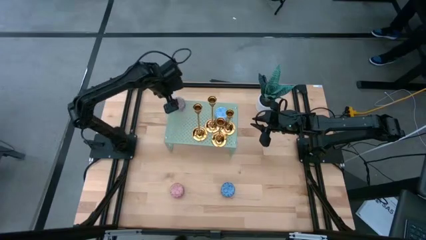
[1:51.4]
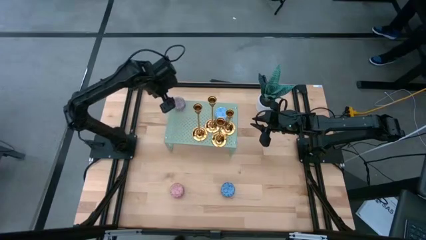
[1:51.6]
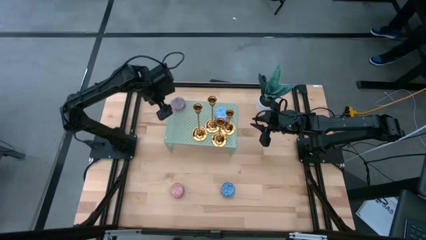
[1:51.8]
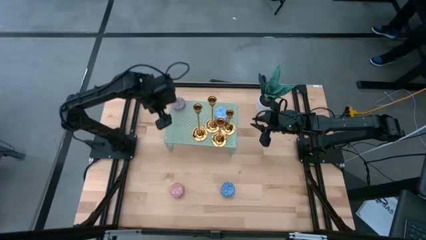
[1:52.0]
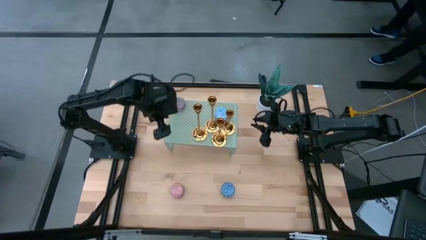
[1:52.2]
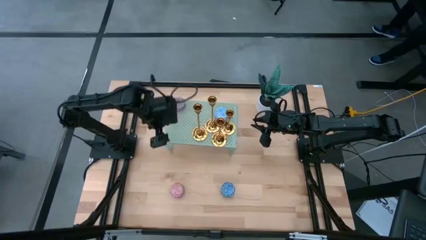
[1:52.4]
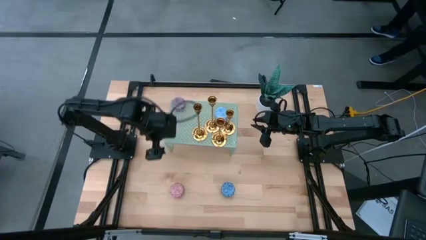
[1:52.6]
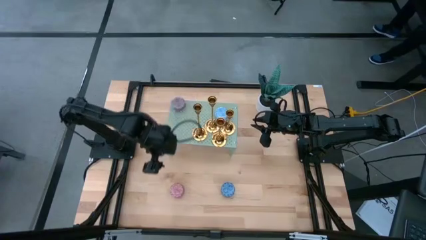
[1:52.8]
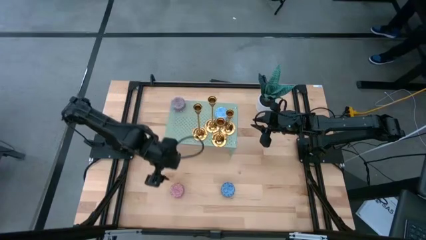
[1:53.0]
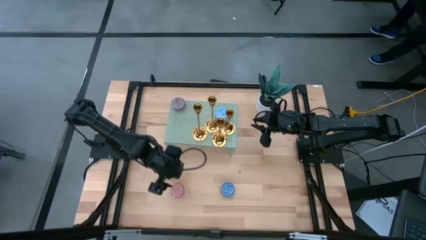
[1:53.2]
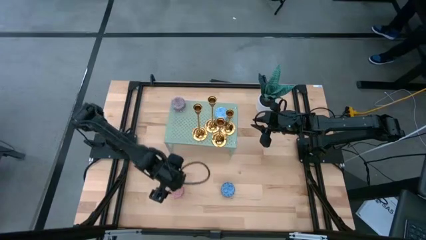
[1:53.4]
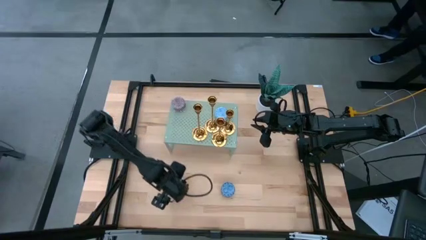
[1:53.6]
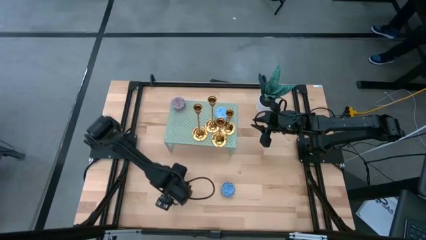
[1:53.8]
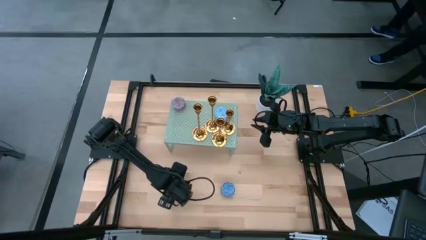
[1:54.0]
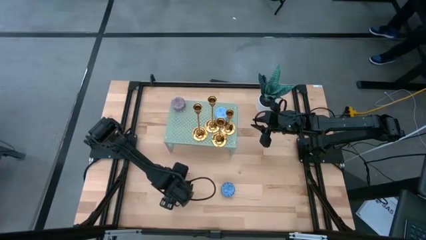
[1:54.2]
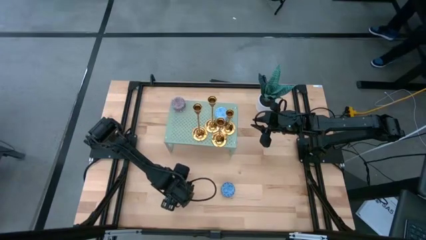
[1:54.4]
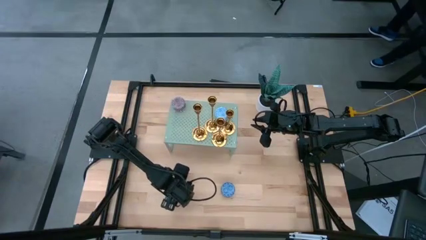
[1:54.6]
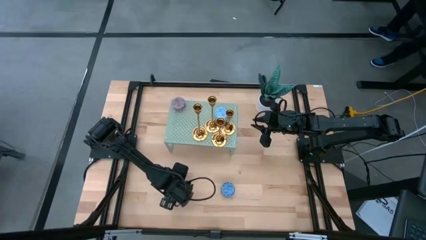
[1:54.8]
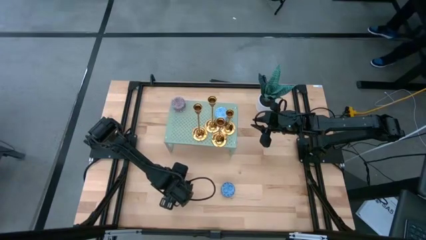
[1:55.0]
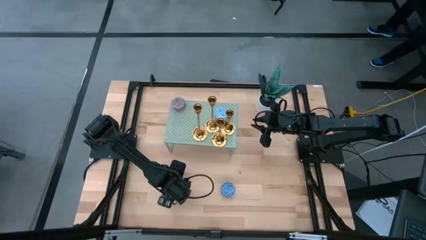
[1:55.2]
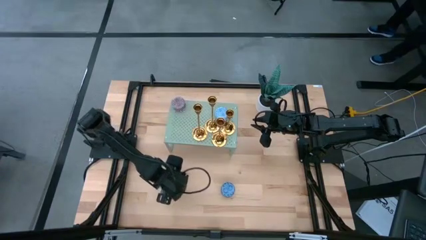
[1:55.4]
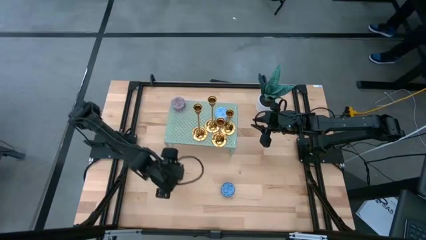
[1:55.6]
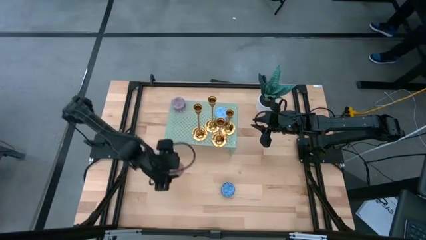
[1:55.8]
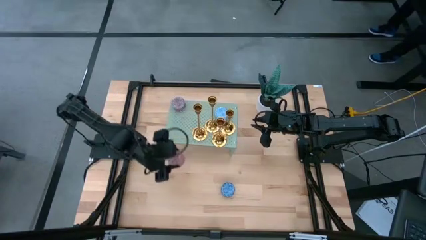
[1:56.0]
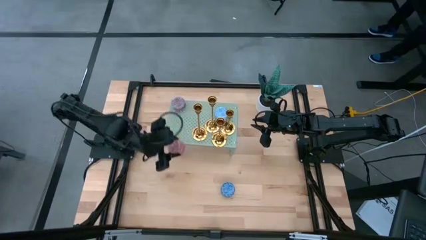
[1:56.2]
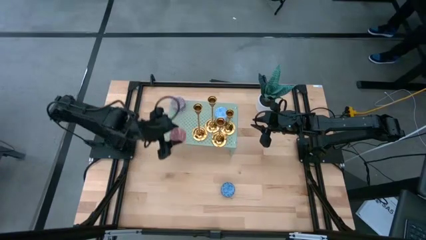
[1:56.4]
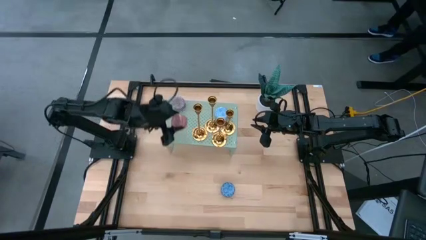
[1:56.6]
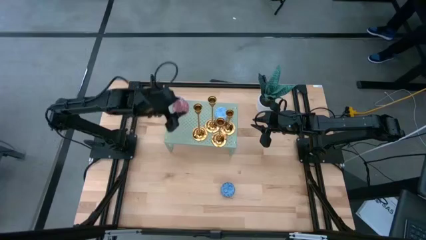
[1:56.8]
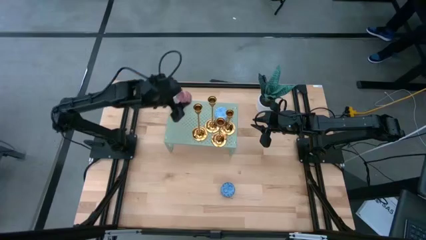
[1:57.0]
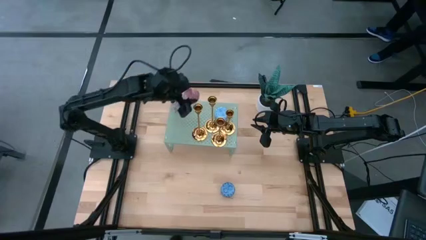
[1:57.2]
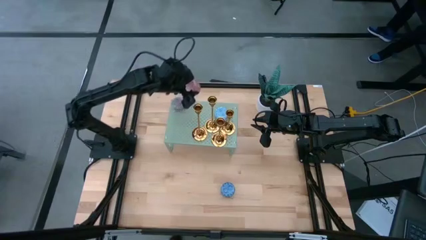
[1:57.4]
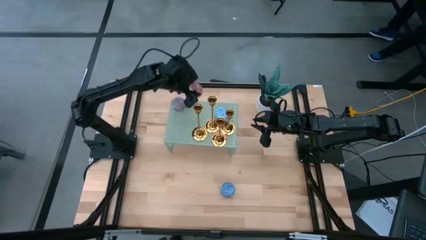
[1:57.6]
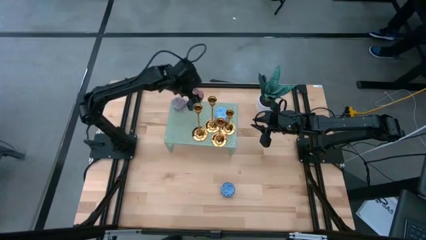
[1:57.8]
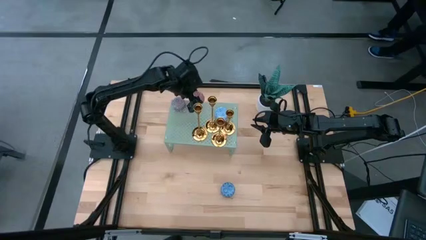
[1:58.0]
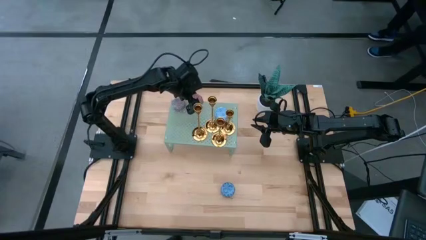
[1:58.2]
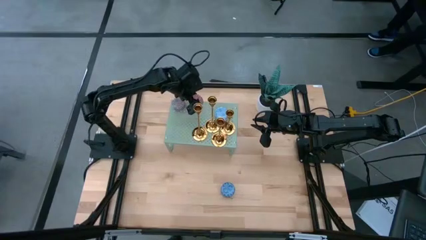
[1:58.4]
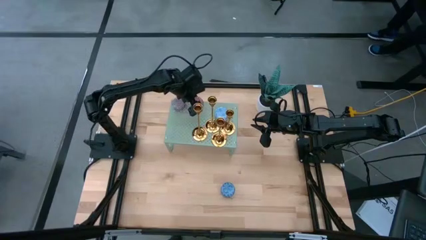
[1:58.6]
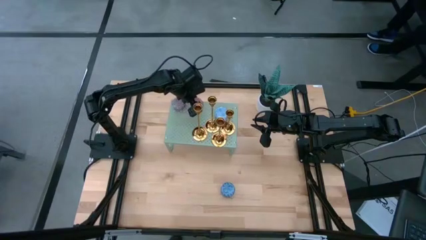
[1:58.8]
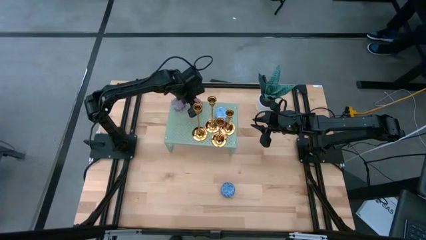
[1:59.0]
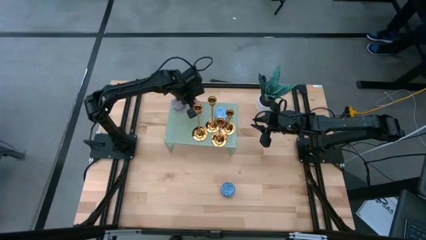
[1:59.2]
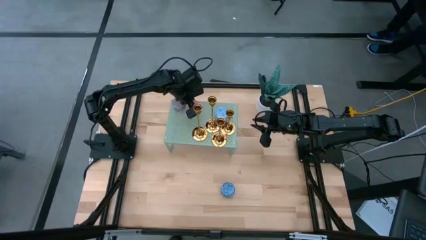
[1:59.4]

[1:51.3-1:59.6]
Task: Pick & Place candle stick holders
Put the pink scented candle on the shelf

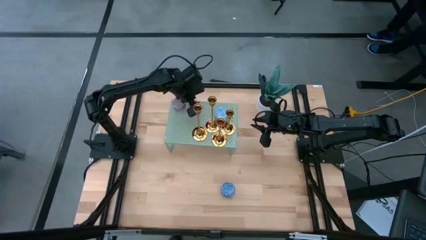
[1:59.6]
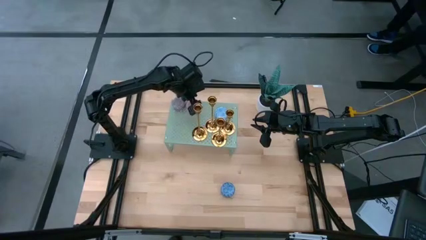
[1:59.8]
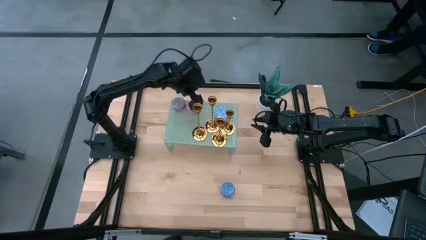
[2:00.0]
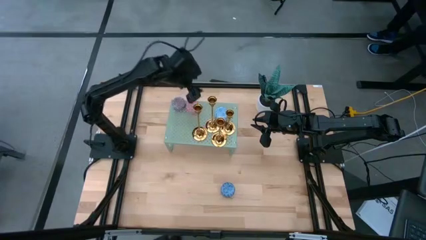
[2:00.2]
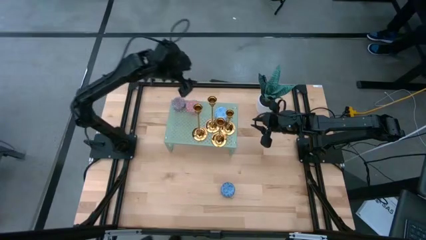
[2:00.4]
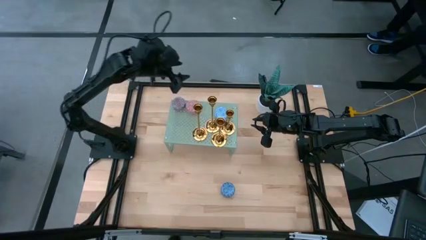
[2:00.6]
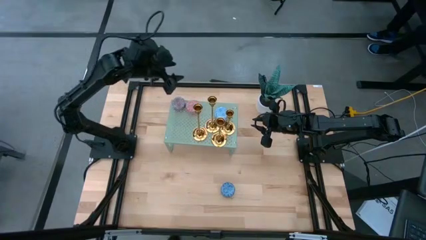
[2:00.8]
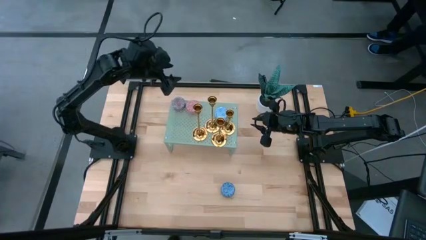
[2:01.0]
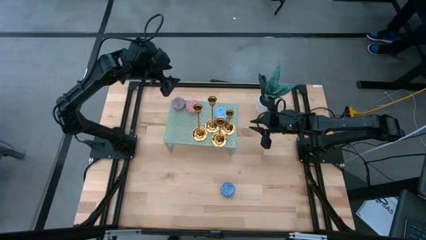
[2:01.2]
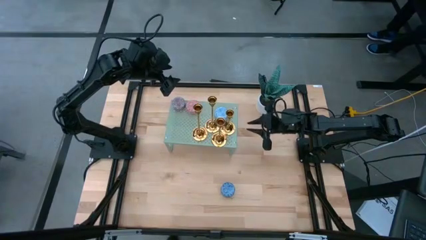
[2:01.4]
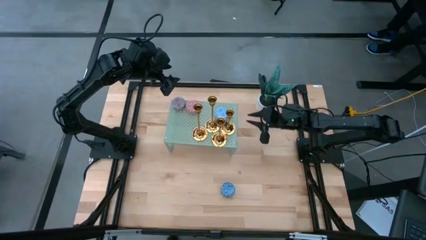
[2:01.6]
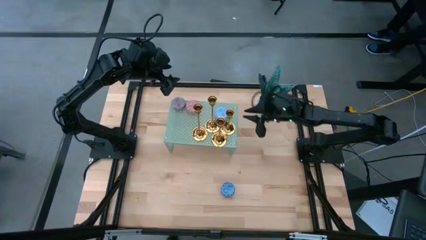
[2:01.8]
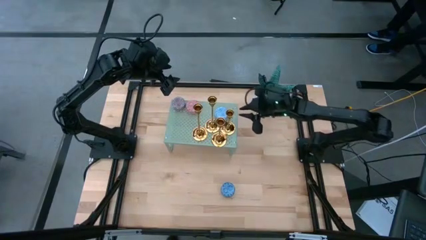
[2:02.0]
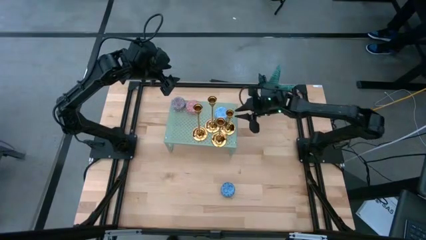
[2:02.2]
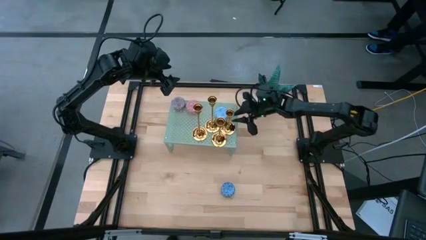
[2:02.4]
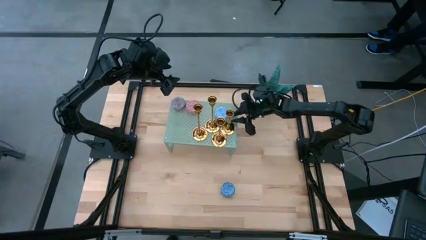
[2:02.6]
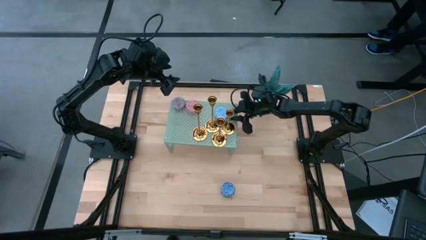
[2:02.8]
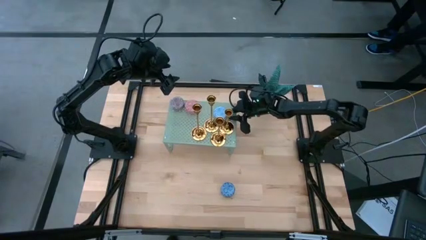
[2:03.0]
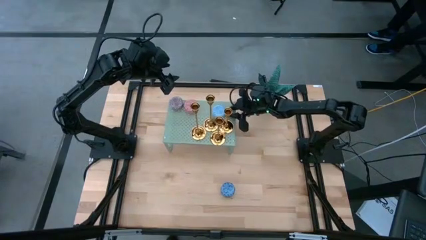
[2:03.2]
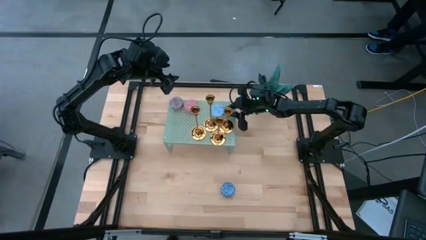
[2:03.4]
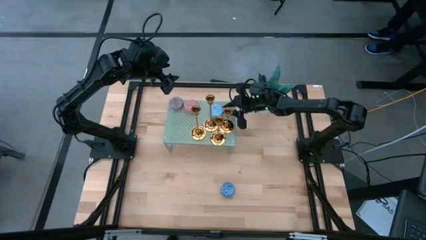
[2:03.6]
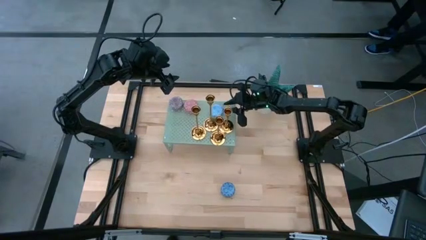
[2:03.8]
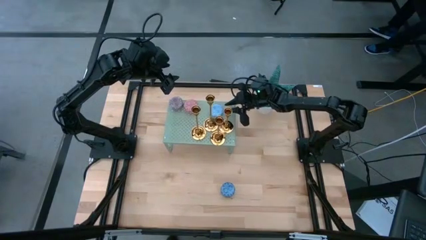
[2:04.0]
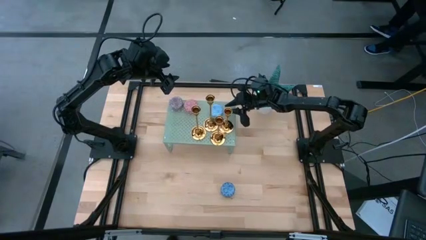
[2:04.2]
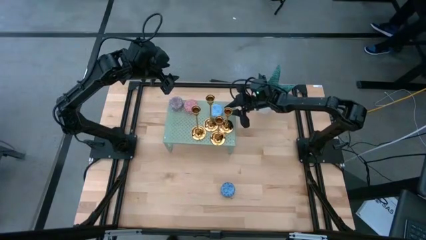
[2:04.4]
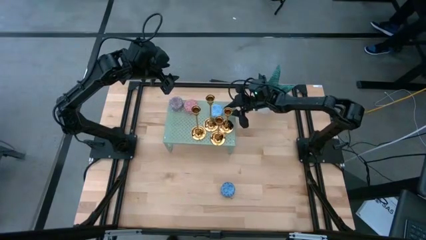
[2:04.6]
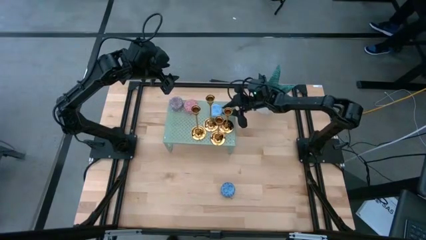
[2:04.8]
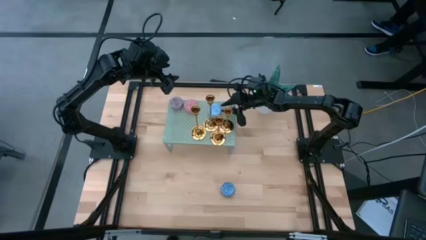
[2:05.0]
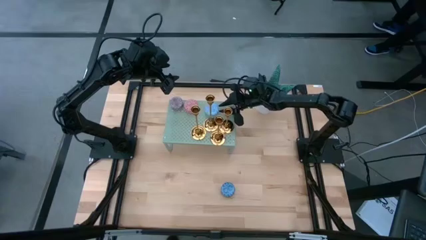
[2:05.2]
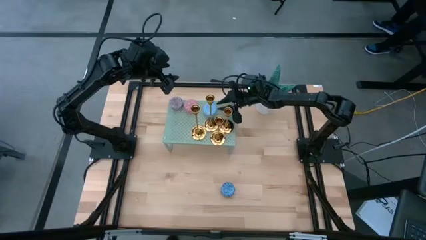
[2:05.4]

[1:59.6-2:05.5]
Adjust the light blue scented candle on the shelf
